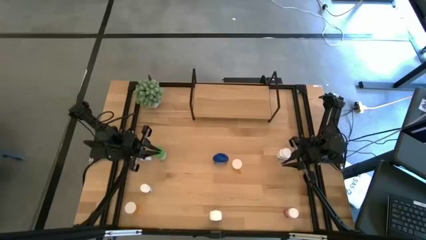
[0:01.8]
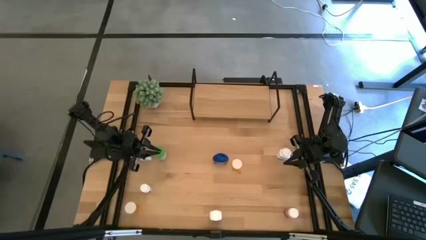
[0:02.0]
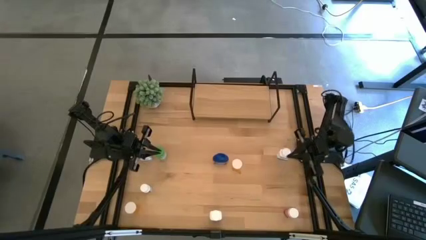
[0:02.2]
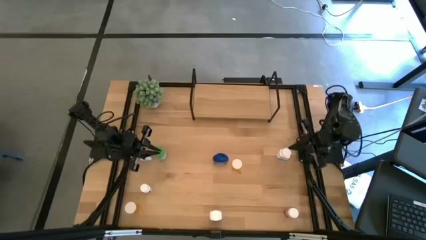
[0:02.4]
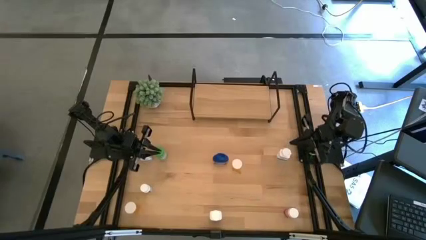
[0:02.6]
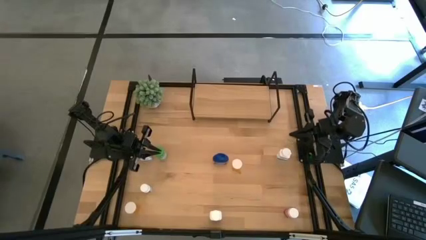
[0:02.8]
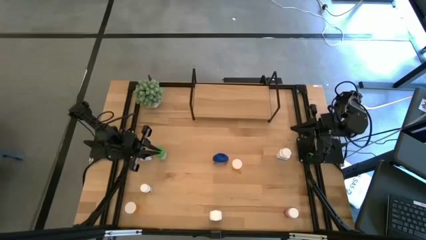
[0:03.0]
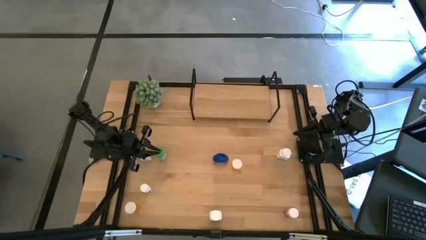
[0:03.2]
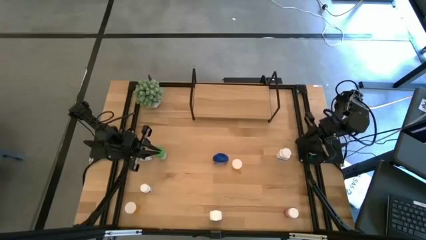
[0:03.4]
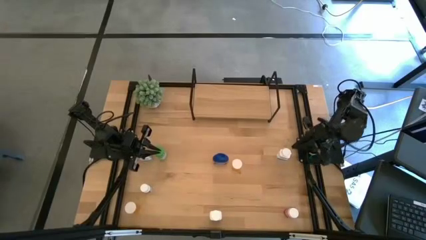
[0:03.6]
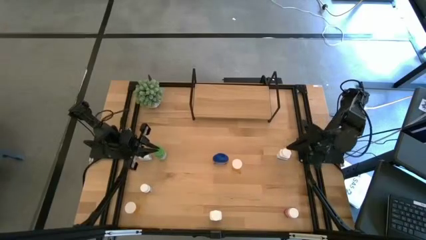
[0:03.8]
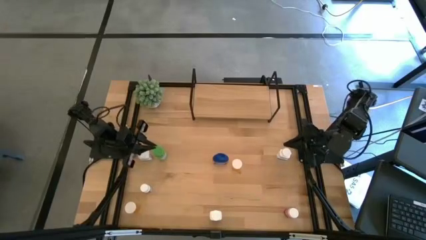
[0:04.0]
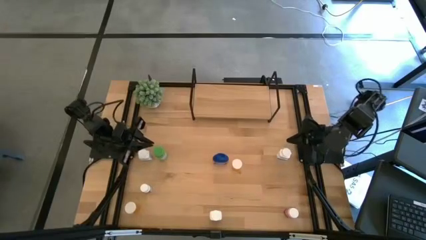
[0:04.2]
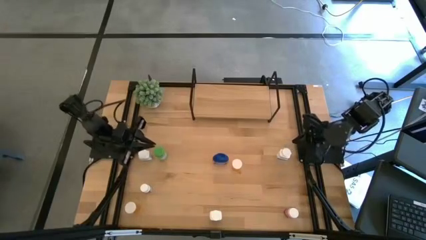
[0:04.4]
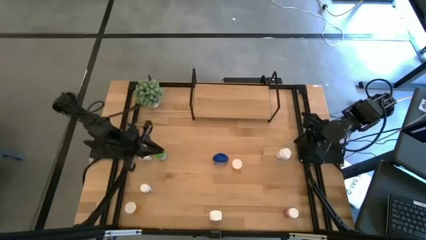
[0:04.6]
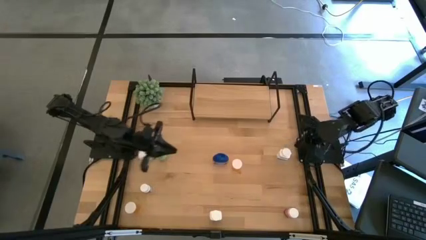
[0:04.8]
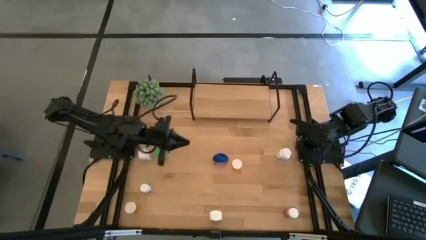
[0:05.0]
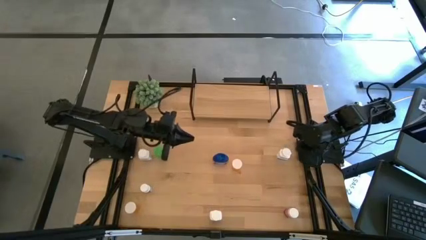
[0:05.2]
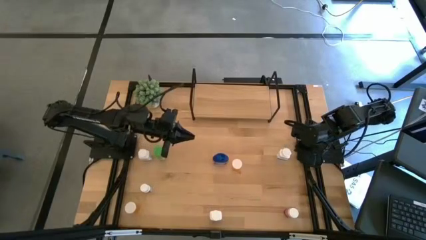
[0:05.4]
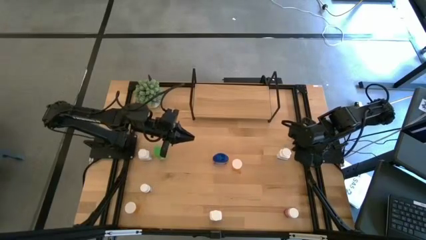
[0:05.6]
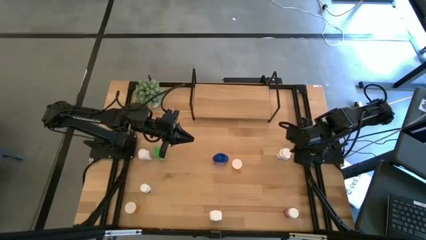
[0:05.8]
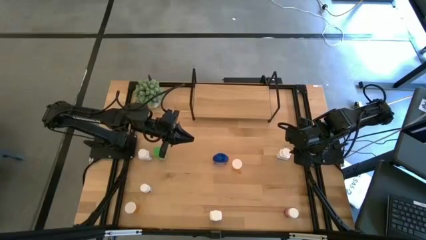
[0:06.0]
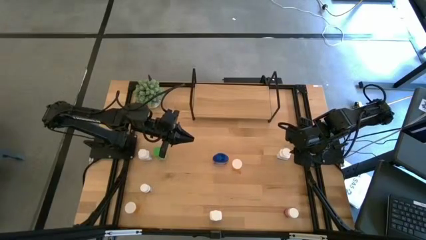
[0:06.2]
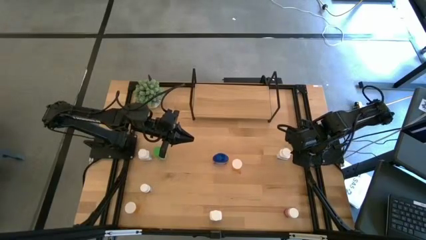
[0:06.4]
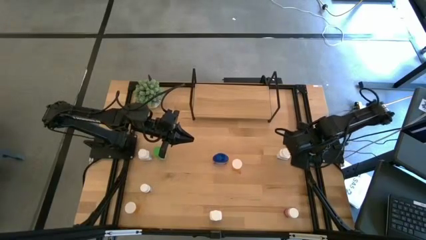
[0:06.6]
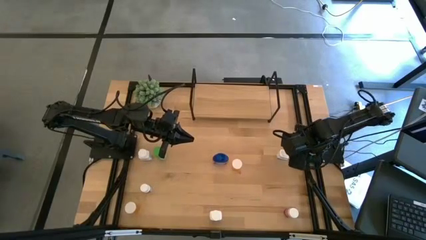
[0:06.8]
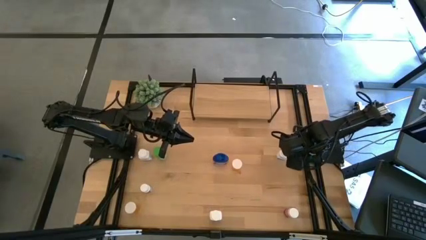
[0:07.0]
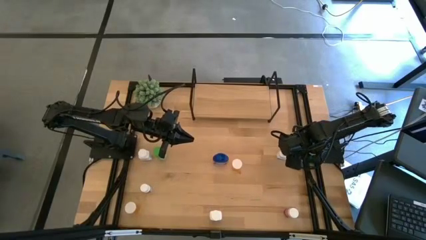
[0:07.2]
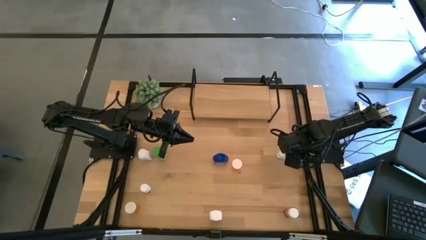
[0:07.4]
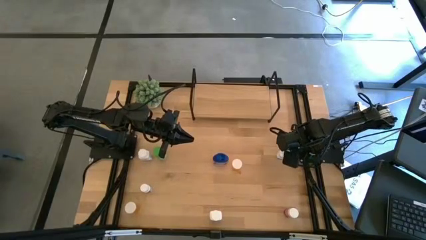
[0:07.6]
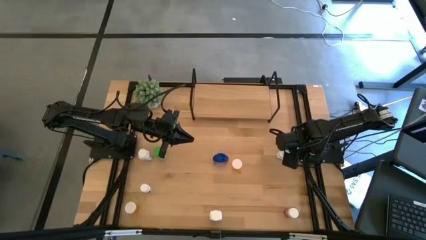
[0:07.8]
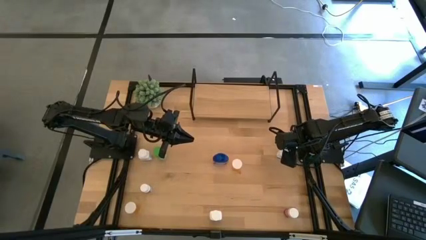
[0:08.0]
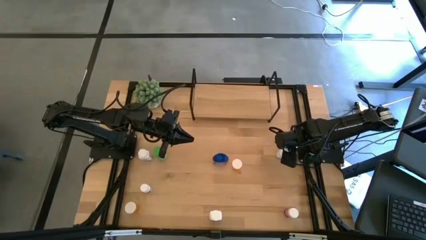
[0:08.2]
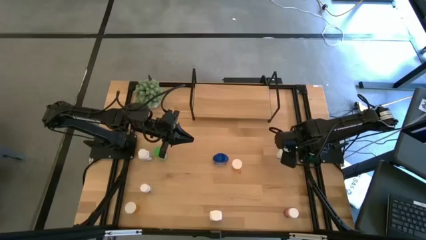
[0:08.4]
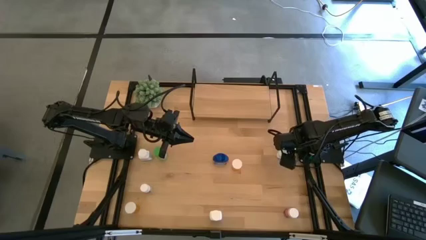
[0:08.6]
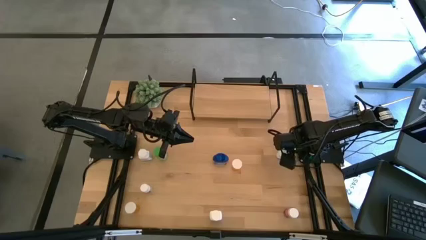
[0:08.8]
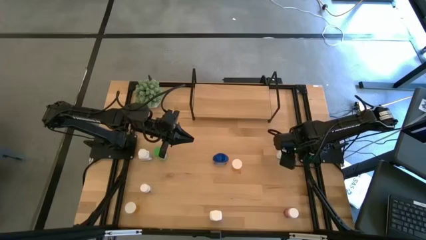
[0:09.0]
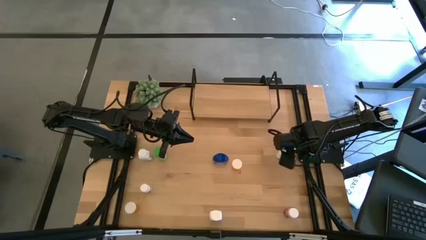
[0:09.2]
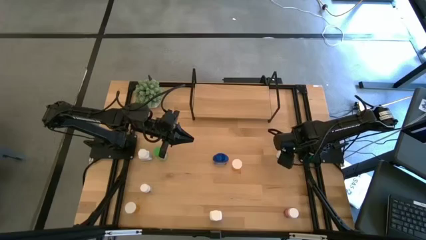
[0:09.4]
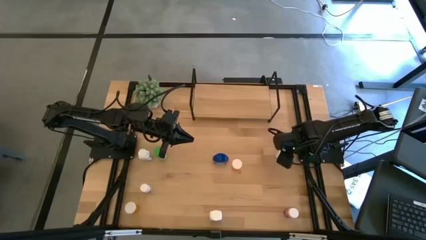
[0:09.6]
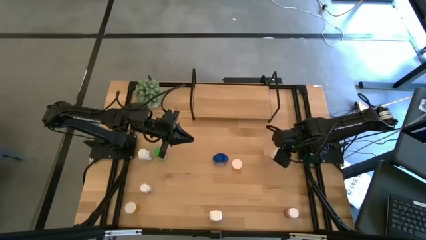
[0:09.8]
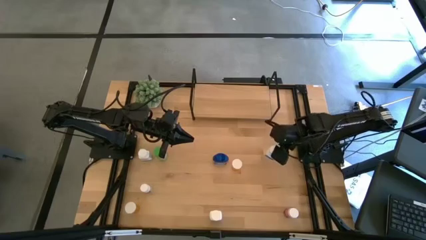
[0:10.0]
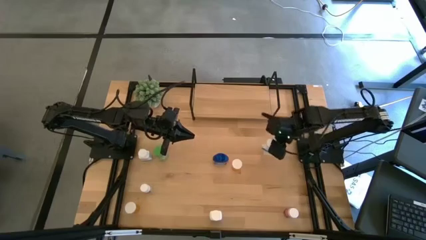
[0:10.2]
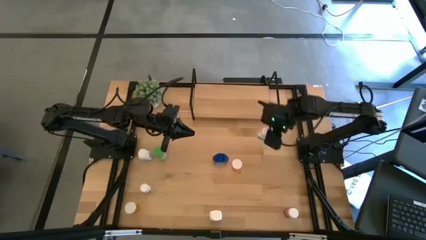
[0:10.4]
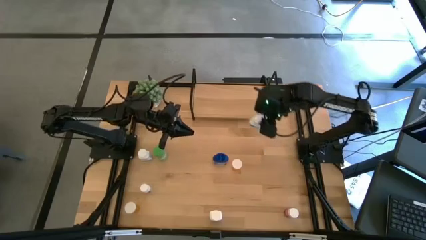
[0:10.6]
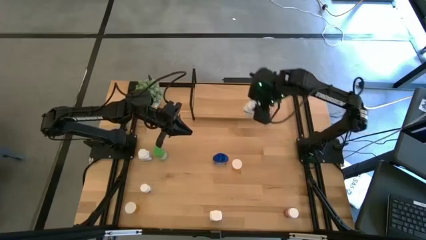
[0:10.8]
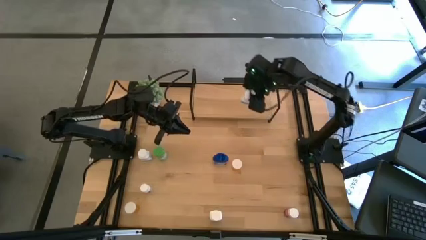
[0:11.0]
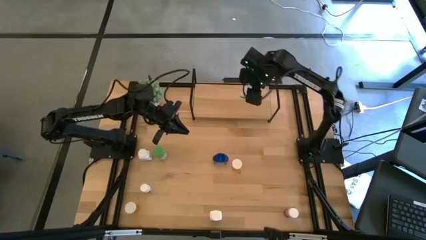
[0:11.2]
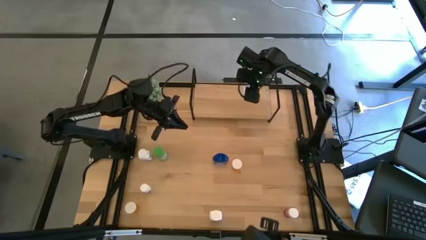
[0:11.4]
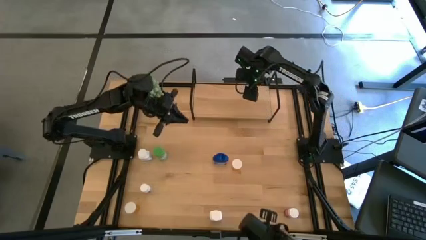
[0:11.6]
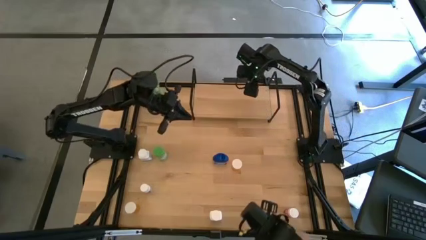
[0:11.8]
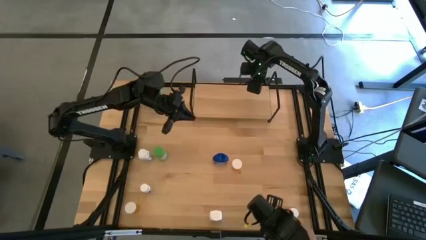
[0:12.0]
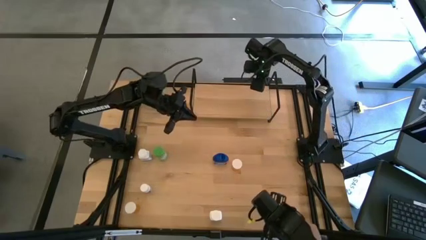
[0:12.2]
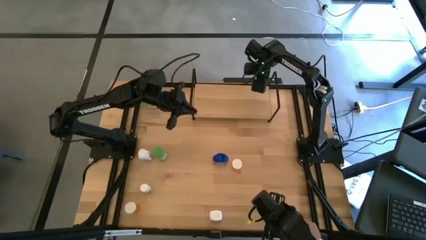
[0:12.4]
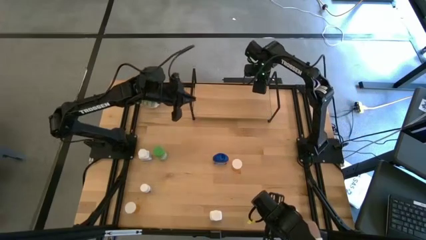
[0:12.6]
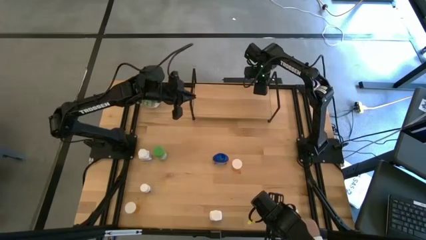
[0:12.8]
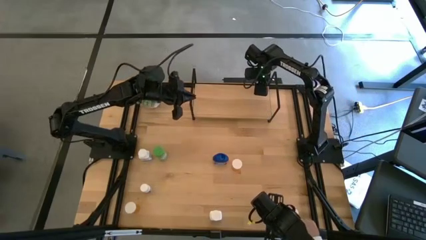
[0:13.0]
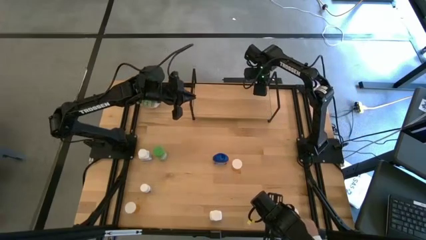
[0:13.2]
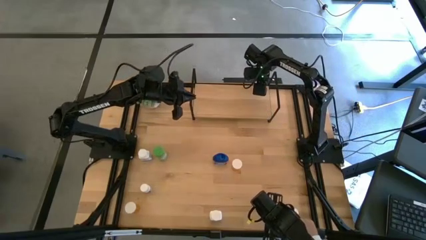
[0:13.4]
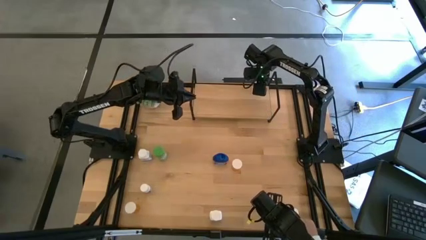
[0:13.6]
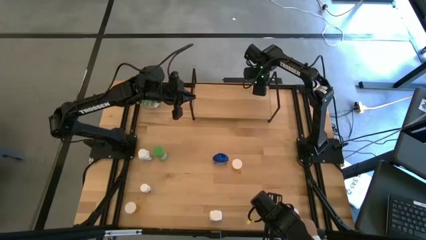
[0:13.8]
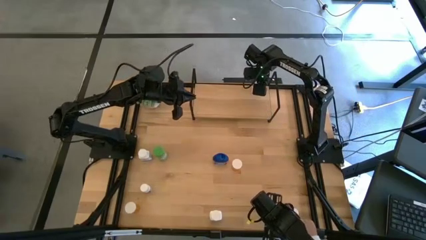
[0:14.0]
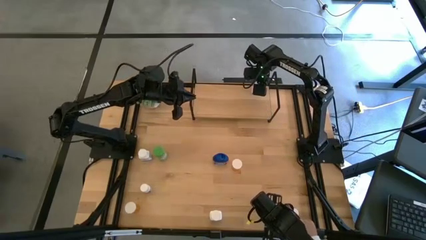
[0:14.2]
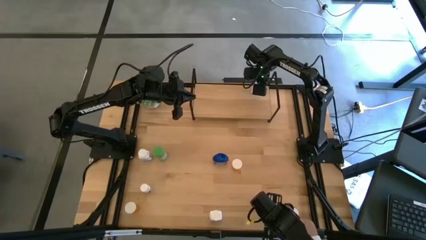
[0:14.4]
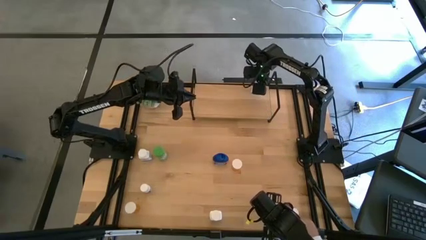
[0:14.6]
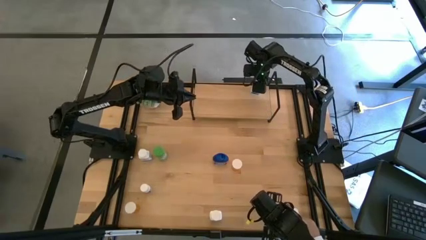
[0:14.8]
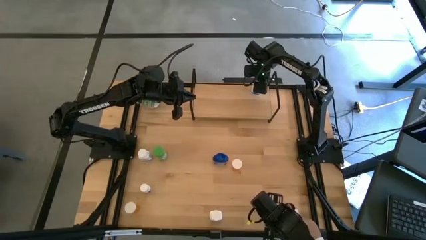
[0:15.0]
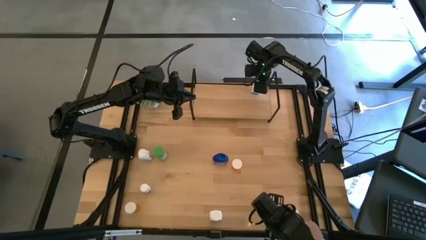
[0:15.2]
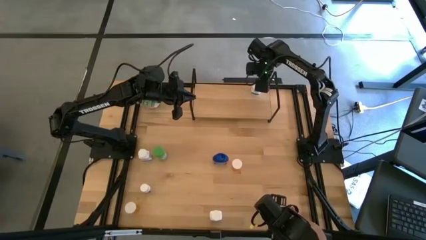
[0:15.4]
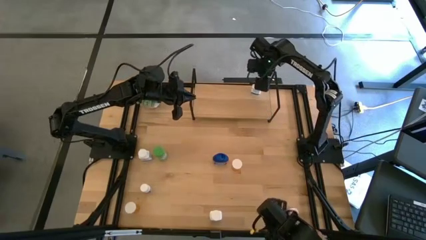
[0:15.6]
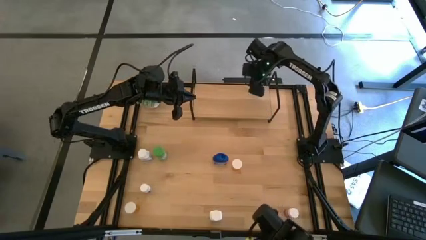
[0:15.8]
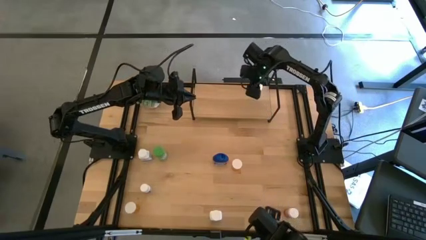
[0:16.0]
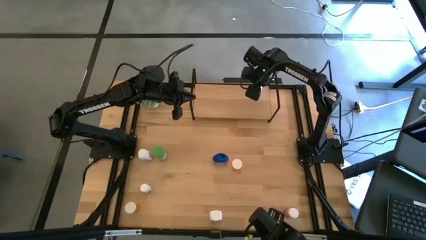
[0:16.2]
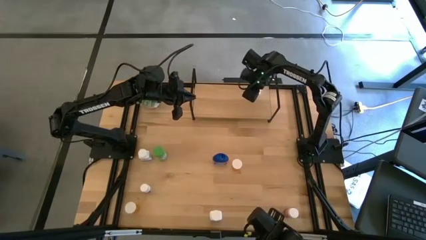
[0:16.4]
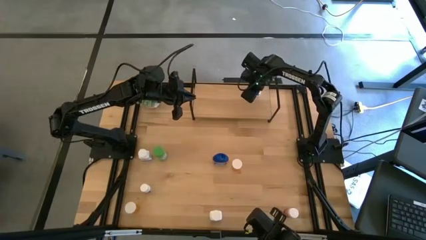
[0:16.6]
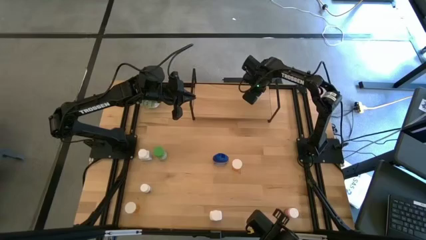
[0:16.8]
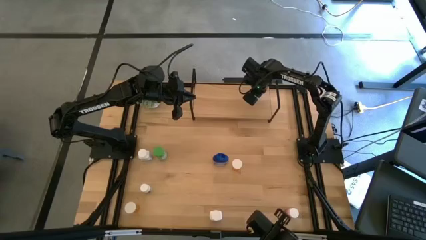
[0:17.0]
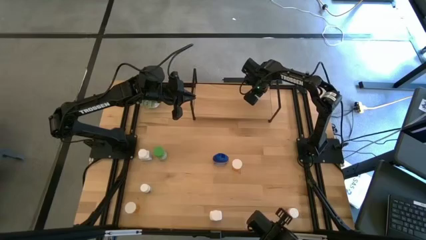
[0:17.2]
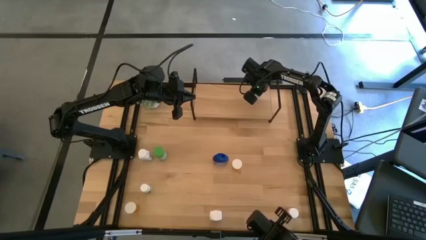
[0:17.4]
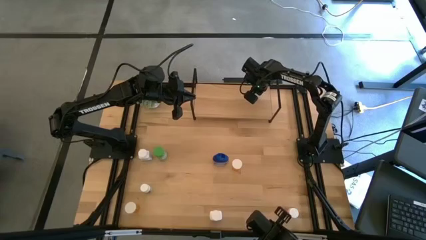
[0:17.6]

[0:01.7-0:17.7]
Task: Pick and place medicine bottles onto shelf by color
Put the top right white blue medicine bottle on the shelf
